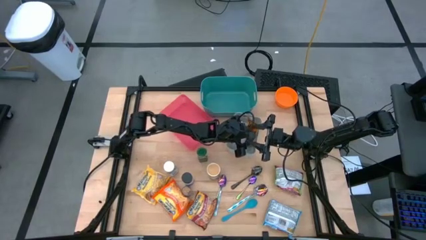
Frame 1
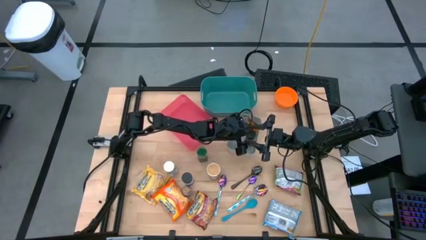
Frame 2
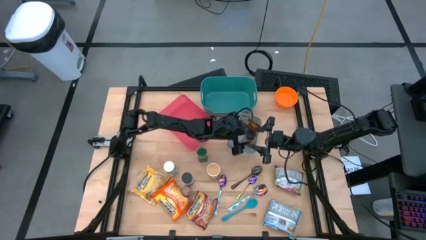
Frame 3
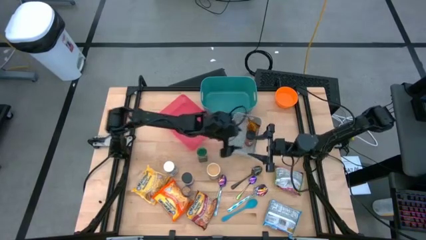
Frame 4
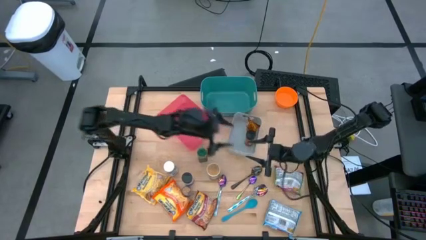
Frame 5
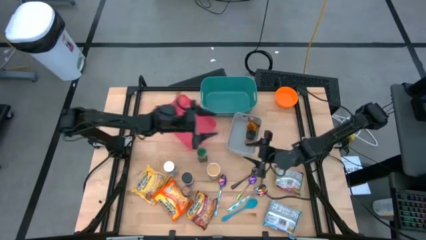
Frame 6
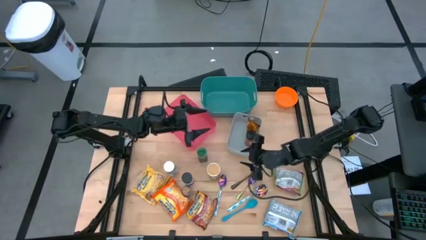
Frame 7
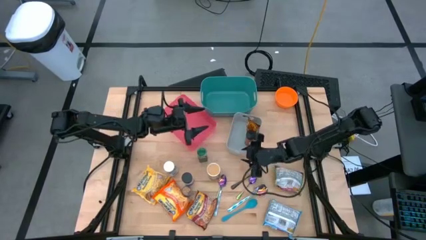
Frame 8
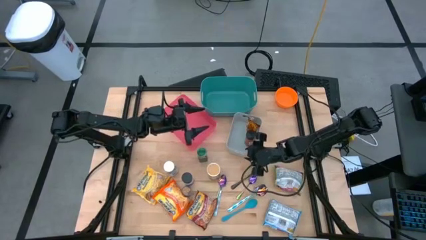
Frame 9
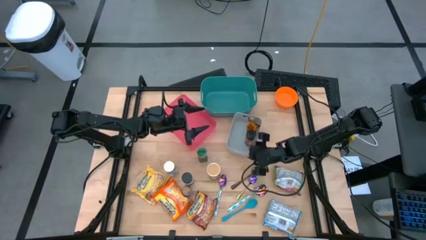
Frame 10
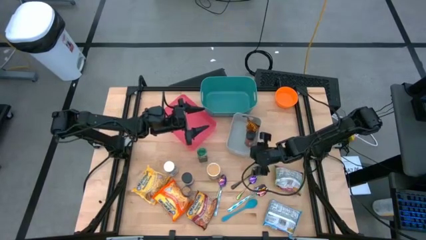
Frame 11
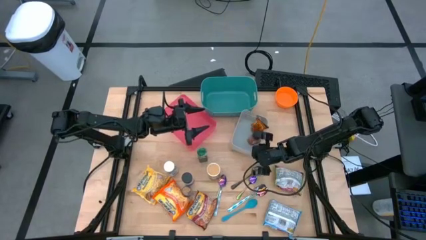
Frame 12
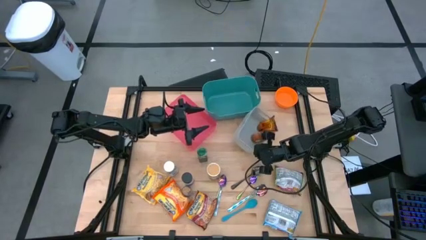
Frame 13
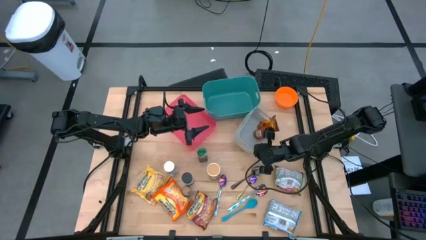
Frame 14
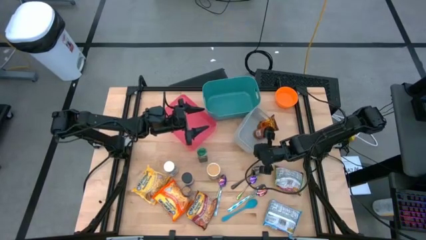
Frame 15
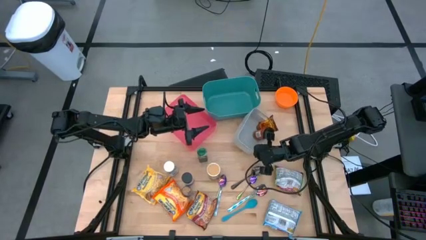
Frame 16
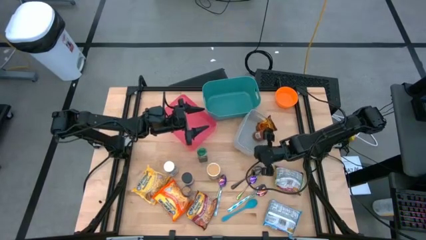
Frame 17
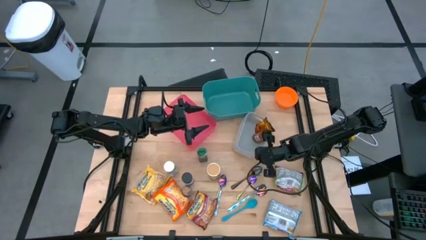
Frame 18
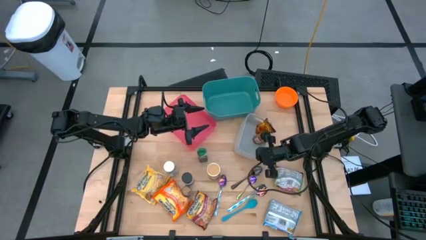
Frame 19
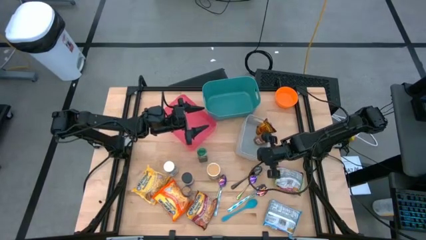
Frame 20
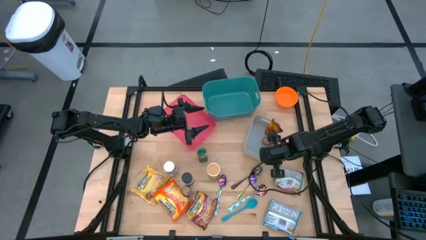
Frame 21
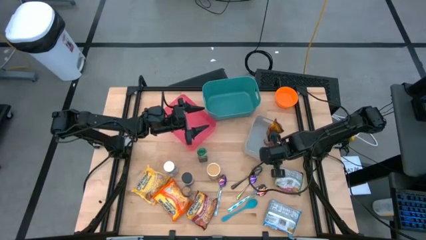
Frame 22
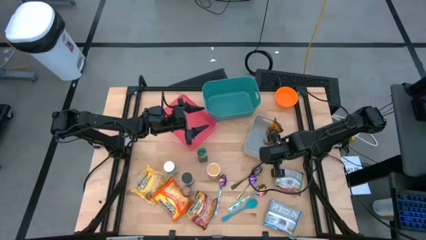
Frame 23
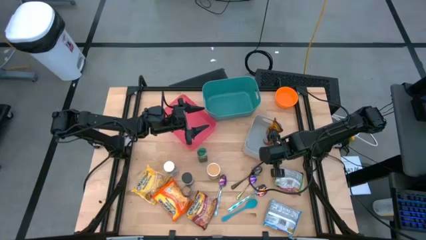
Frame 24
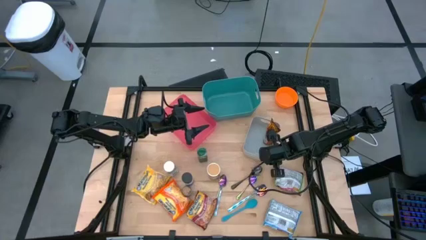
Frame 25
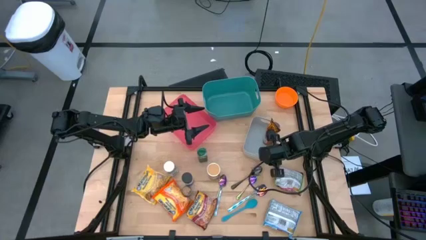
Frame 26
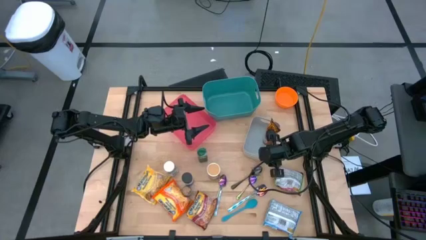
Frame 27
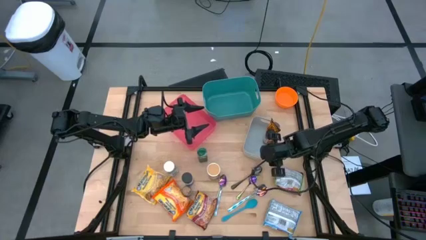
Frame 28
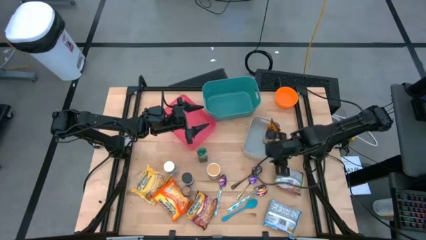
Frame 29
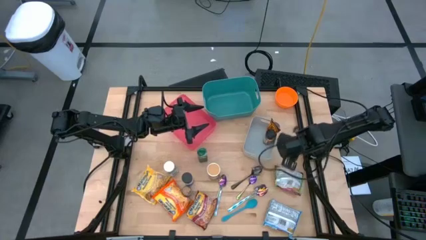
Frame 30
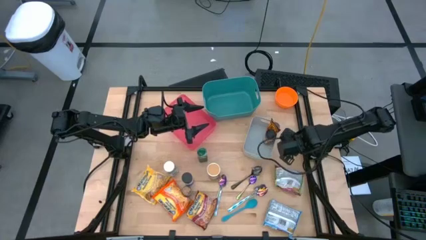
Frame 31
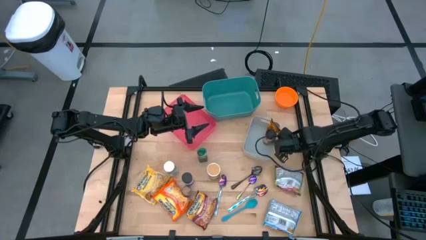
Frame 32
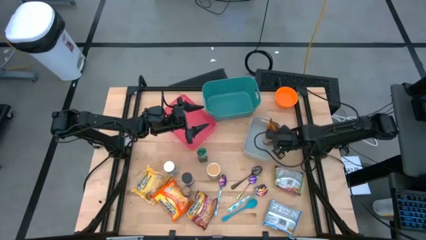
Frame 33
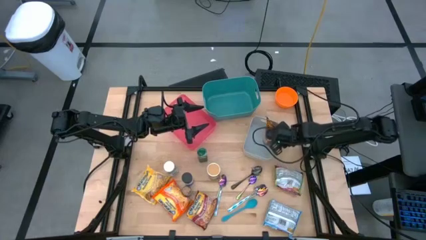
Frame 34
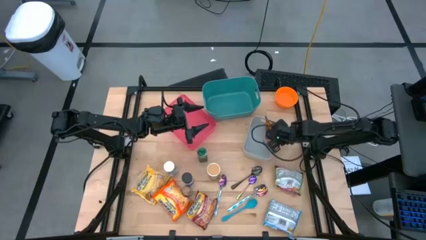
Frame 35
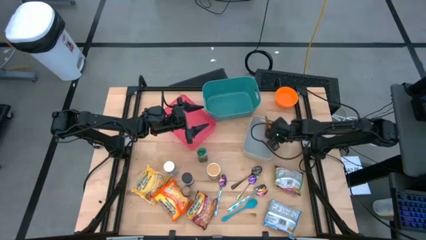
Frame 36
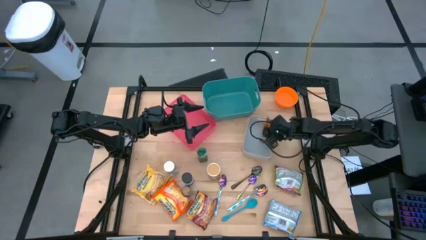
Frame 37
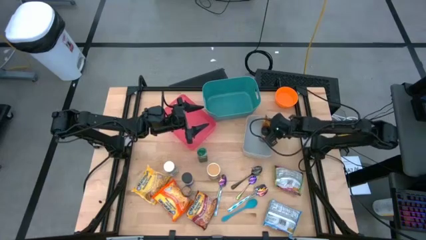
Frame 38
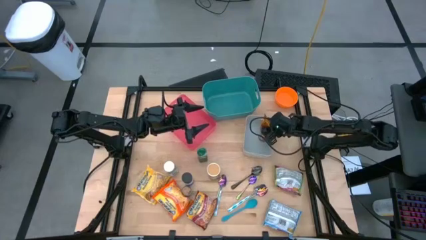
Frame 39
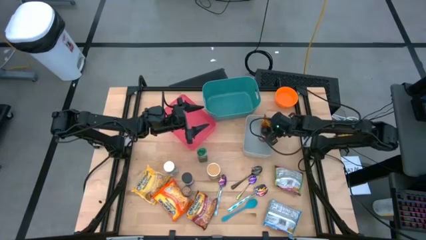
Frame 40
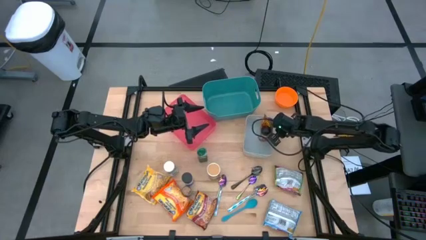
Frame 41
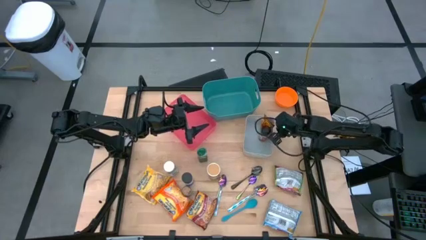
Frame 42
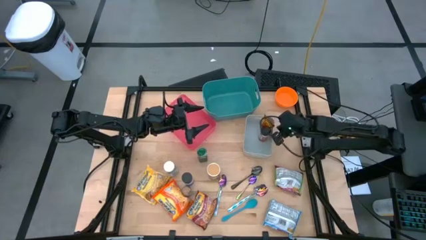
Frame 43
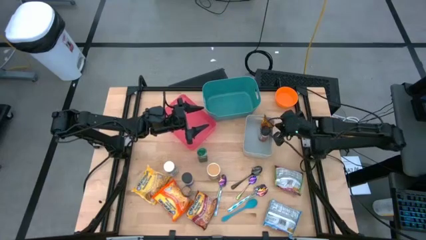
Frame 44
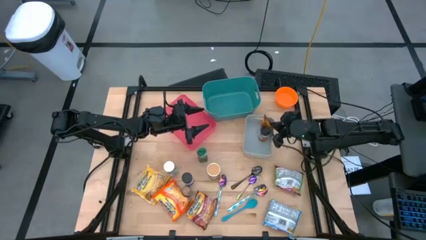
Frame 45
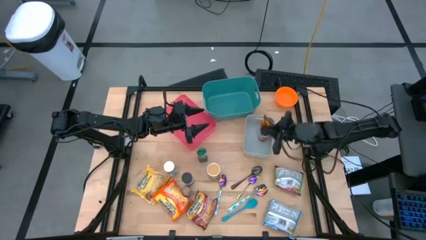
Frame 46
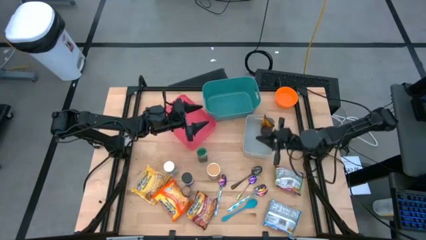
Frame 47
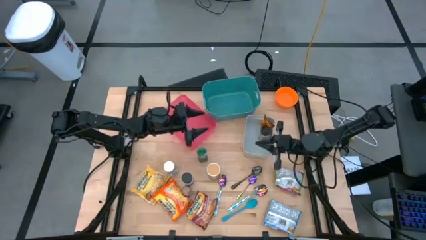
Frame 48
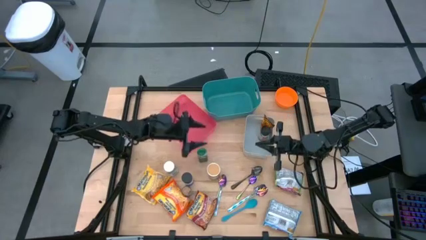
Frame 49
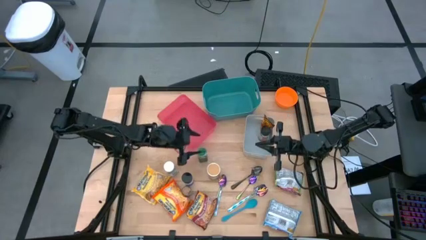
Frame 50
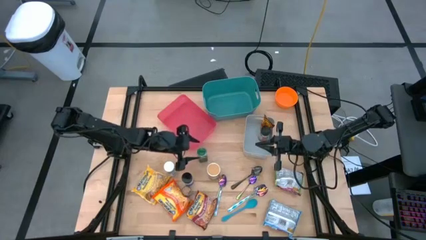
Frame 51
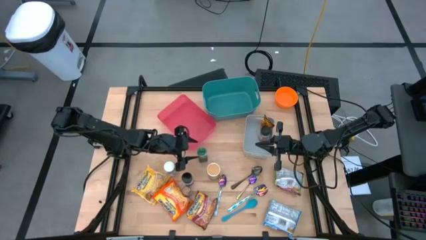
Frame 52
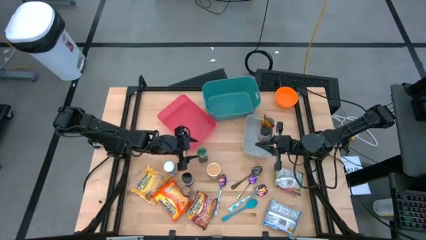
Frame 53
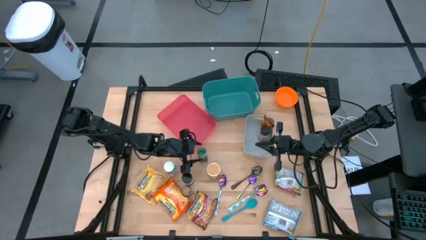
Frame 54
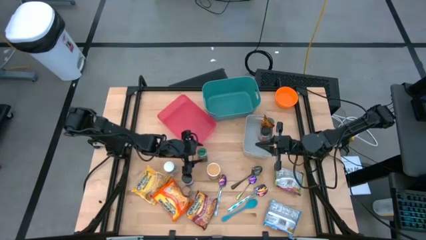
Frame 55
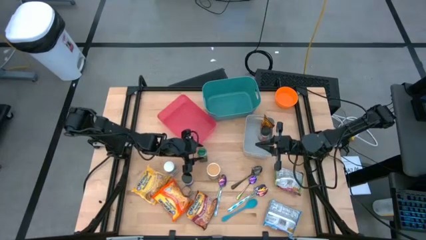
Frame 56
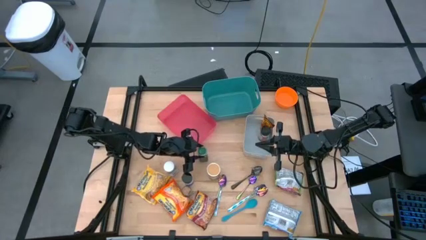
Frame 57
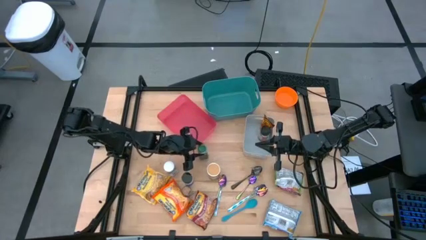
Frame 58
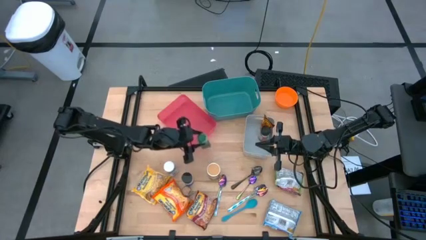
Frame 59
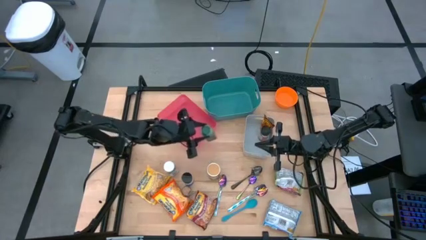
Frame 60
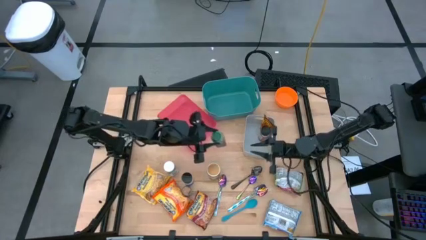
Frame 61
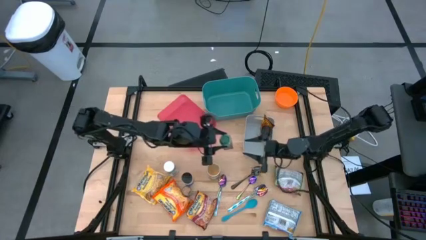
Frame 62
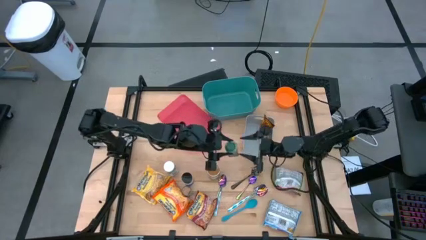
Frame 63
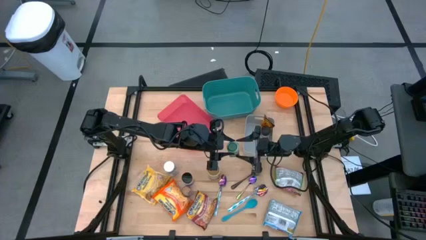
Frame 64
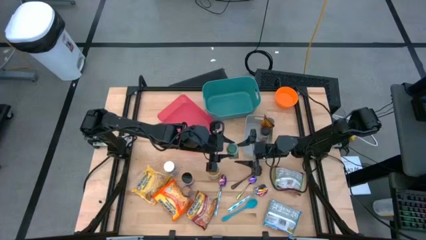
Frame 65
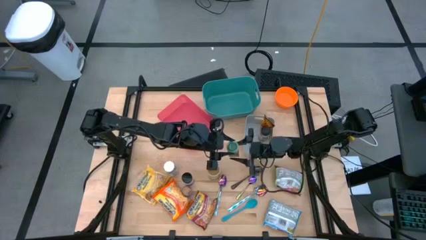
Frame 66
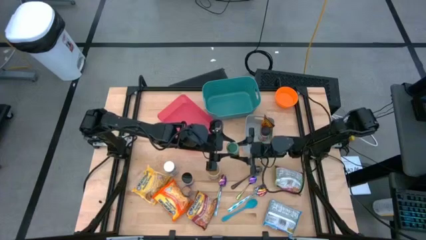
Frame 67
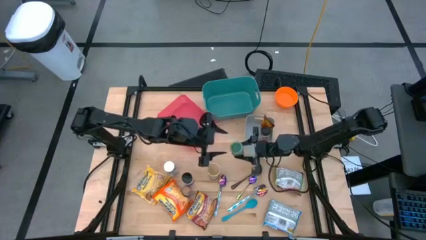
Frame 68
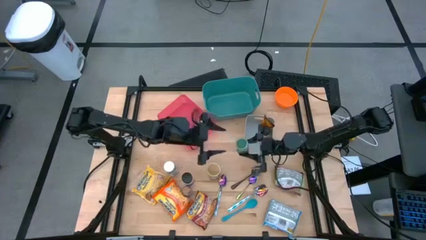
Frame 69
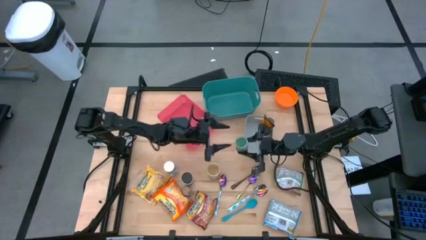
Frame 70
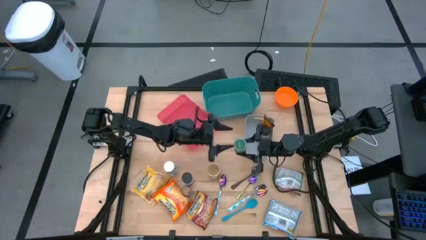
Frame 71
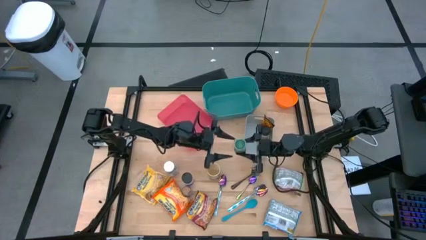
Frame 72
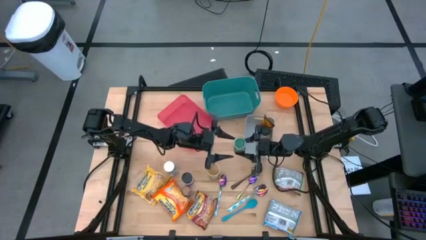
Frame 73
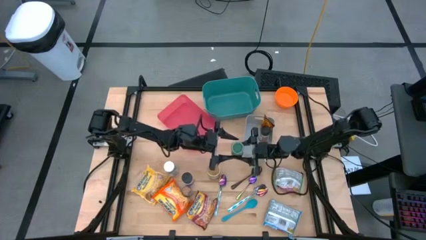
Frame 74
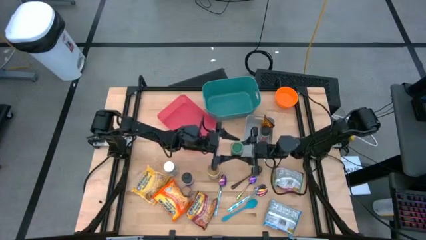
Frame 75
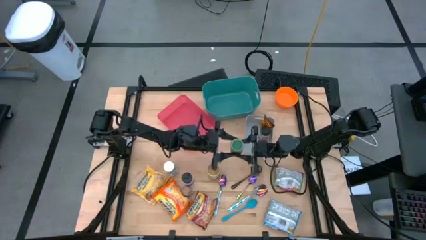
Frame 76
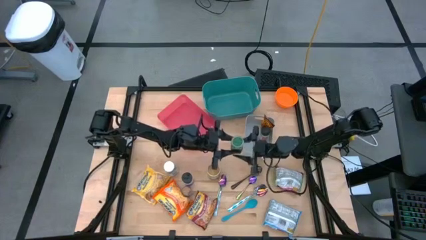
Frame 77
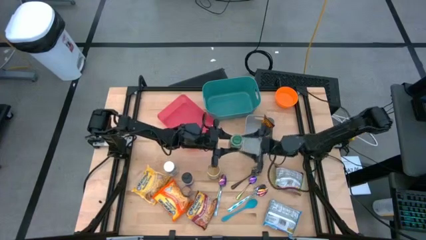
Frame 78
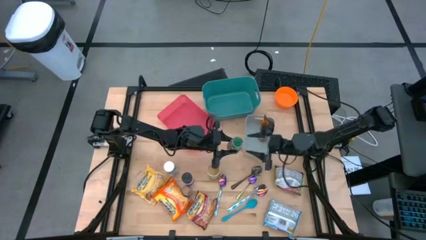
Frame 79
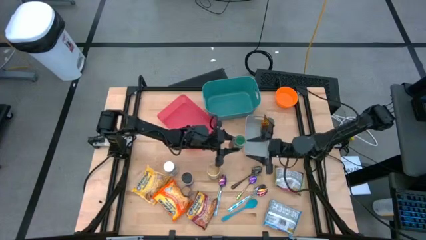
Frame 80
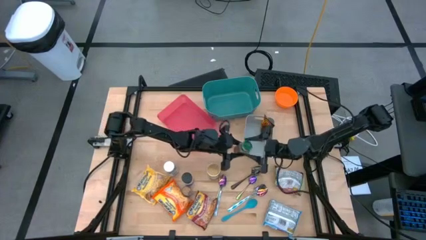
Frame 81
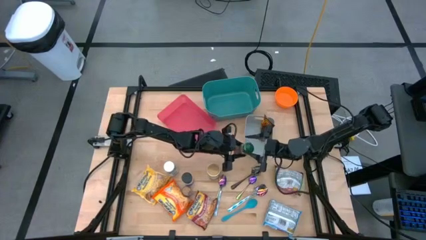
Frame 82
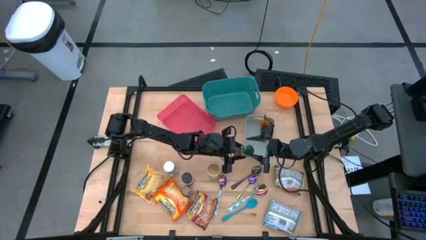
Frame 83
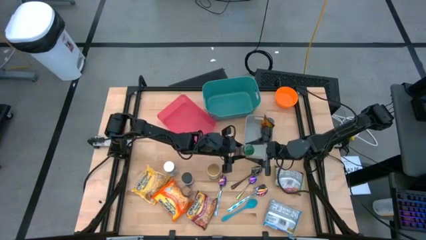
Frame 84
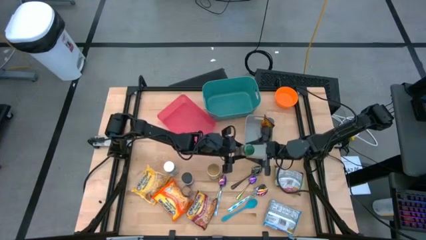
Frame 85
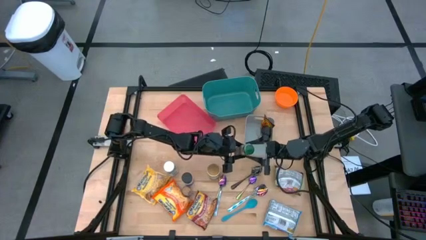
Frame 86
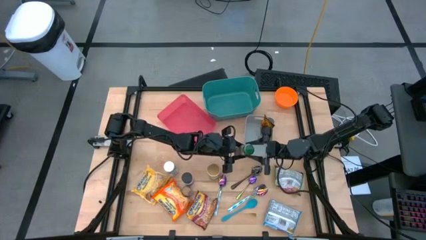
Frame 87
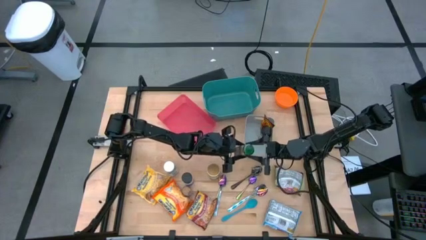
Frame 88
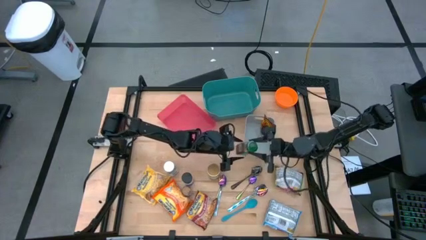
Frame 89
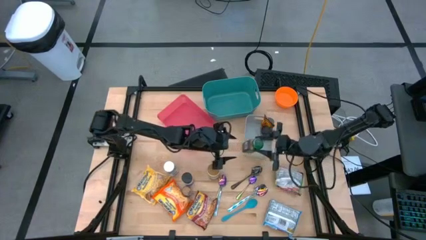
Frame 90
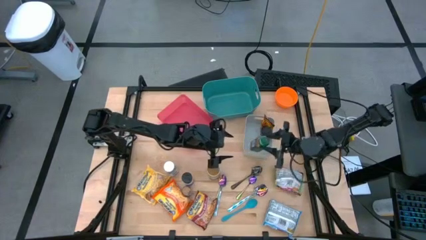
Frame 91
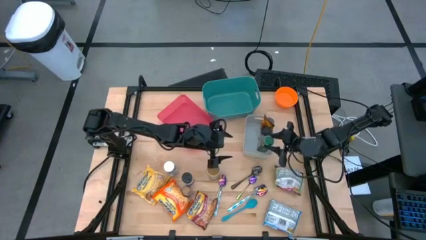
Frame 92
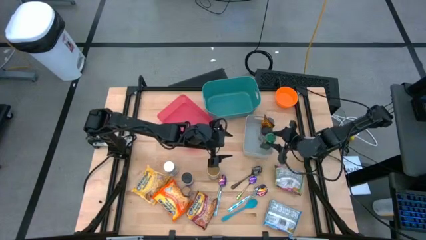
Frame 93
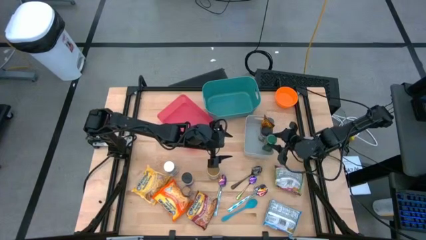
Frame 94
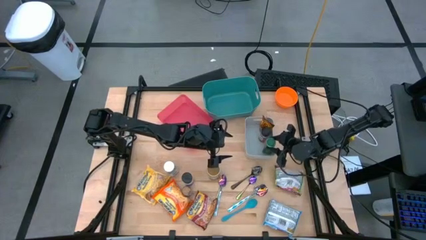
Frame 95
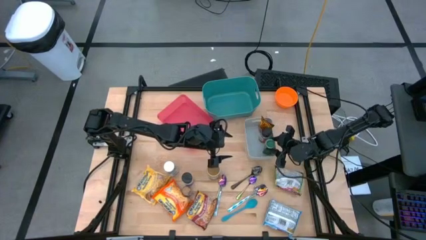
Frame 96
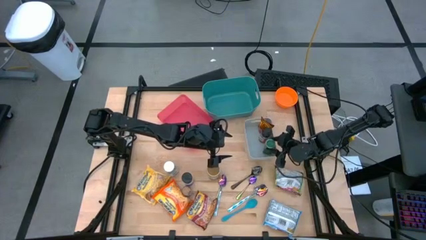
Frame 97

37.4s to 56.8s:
Task: Pick & Place Food Item
Put the green spice bottle into the gray bin
